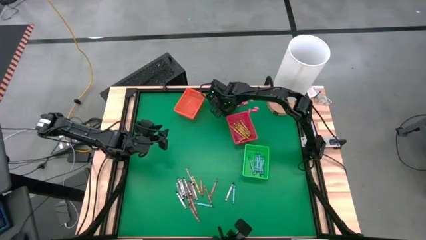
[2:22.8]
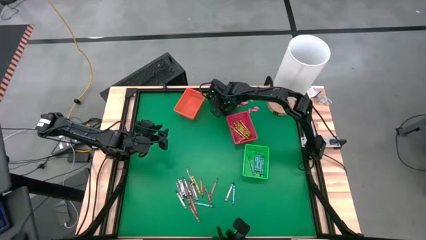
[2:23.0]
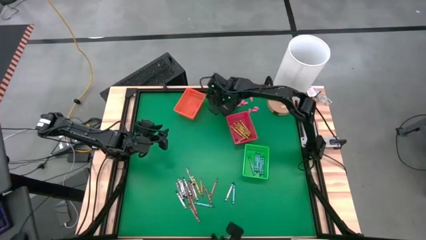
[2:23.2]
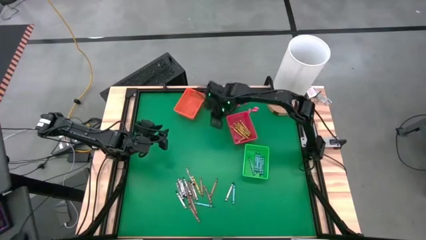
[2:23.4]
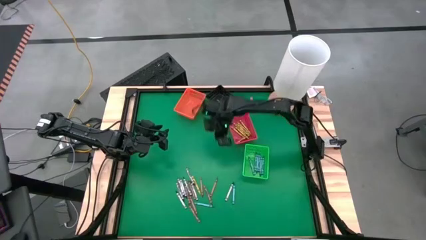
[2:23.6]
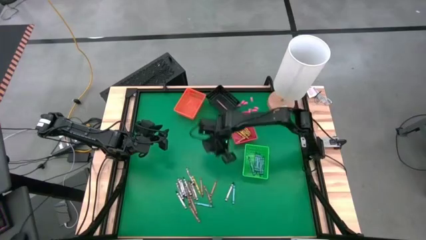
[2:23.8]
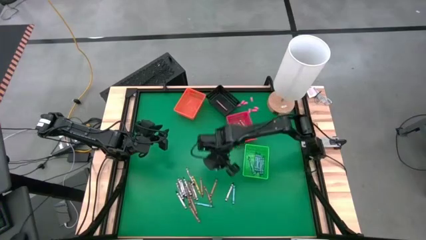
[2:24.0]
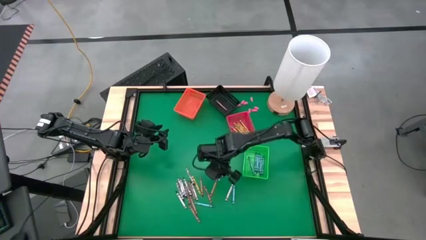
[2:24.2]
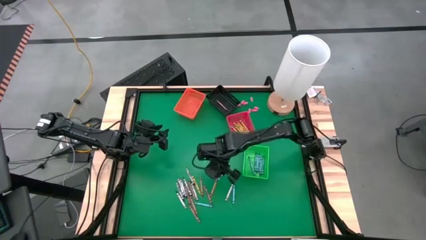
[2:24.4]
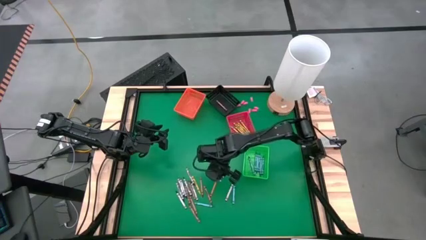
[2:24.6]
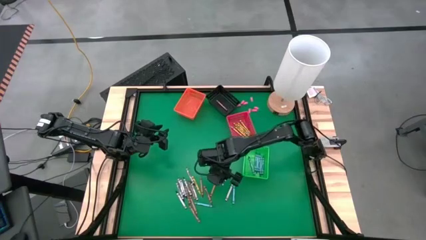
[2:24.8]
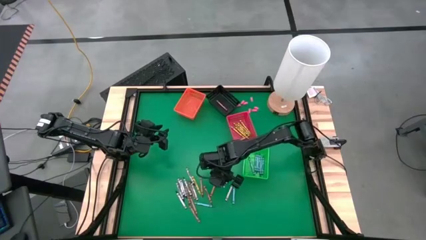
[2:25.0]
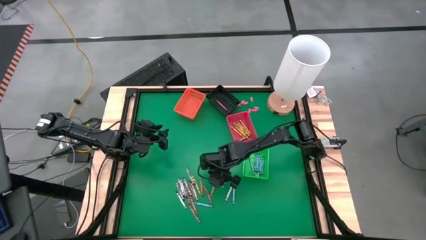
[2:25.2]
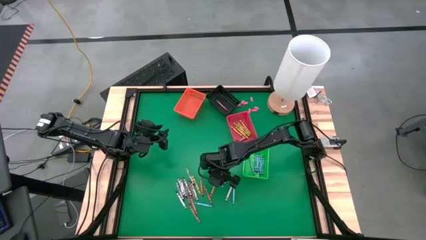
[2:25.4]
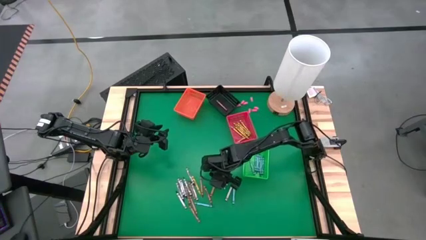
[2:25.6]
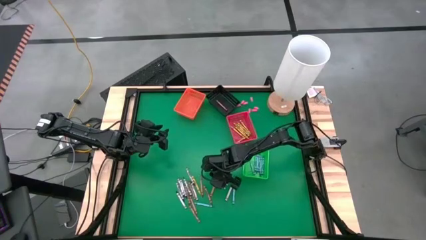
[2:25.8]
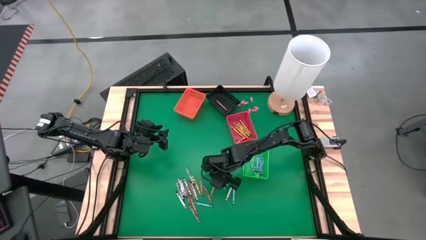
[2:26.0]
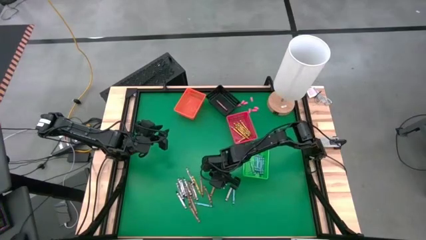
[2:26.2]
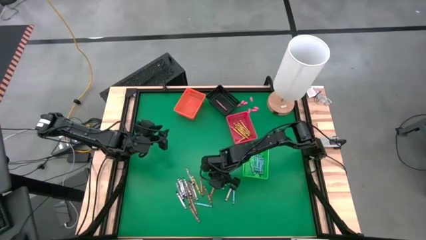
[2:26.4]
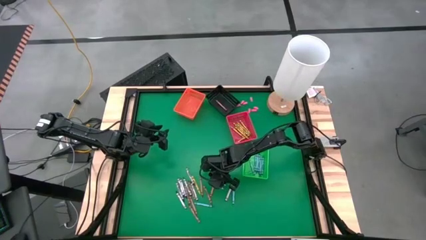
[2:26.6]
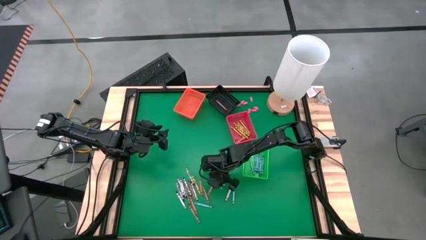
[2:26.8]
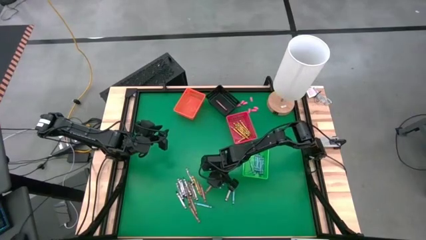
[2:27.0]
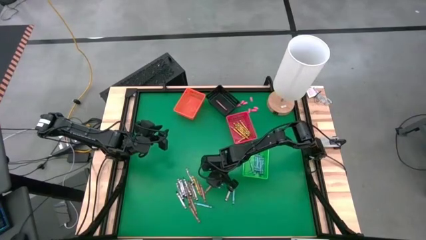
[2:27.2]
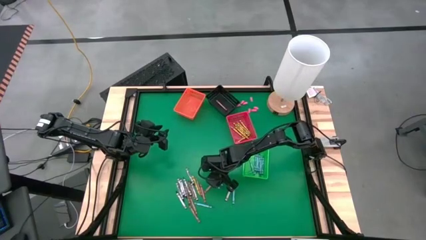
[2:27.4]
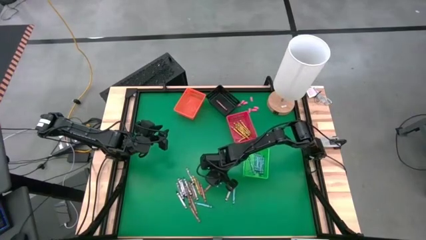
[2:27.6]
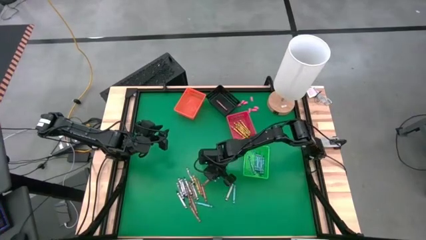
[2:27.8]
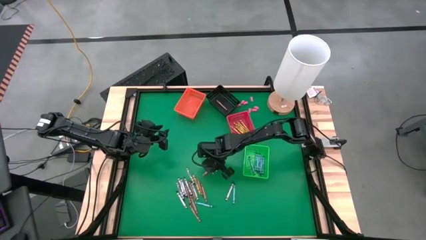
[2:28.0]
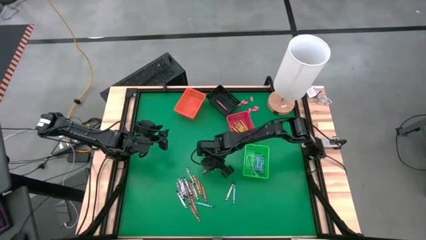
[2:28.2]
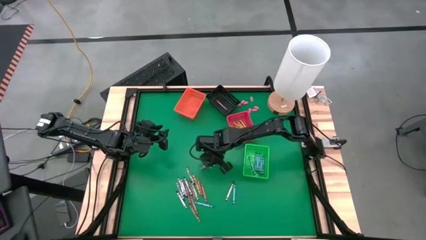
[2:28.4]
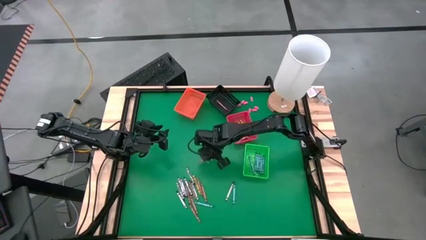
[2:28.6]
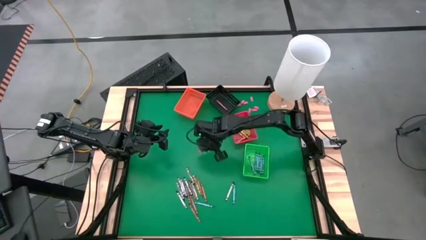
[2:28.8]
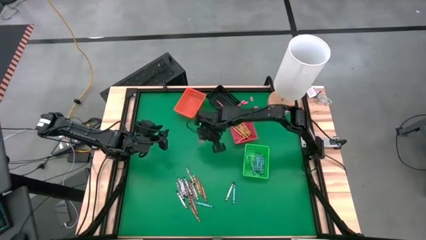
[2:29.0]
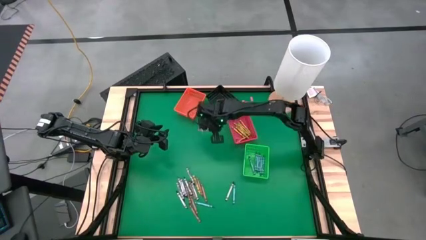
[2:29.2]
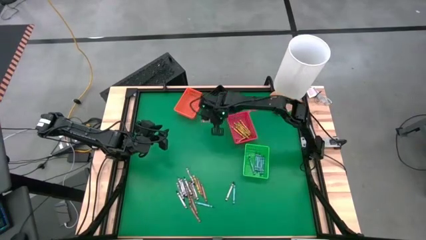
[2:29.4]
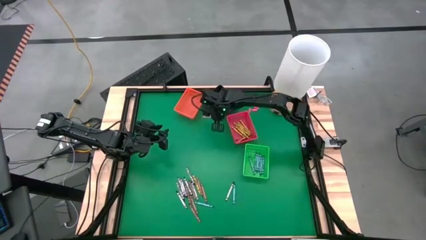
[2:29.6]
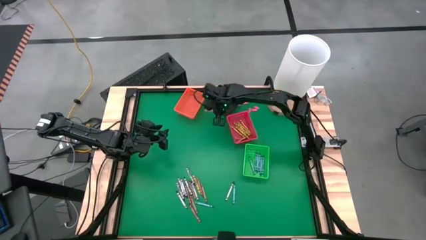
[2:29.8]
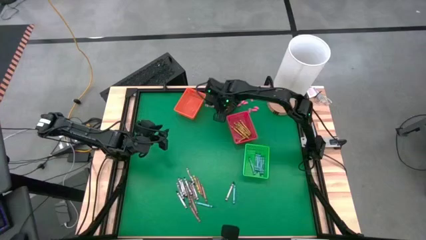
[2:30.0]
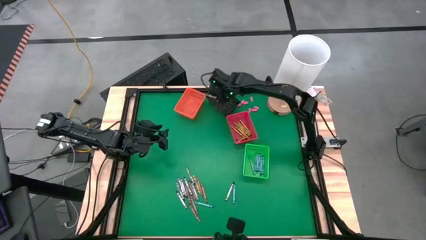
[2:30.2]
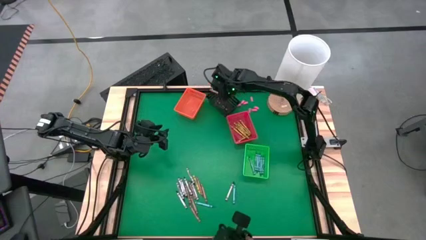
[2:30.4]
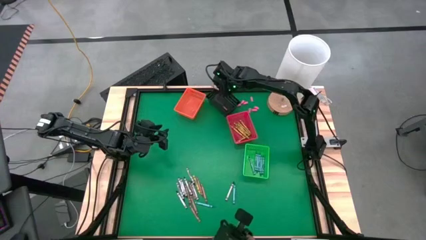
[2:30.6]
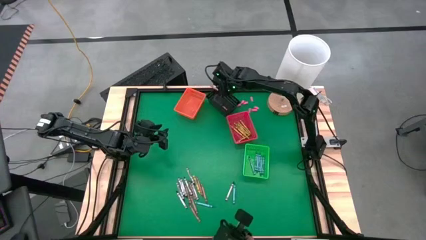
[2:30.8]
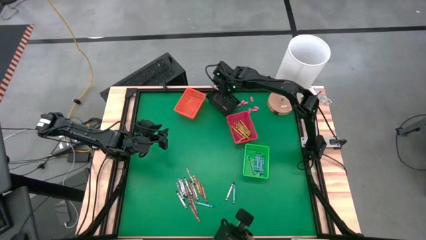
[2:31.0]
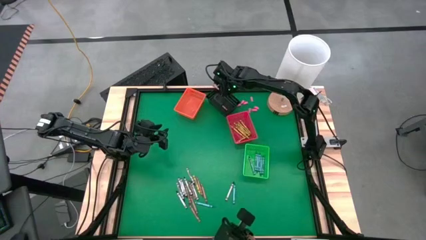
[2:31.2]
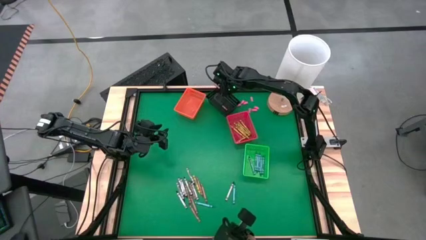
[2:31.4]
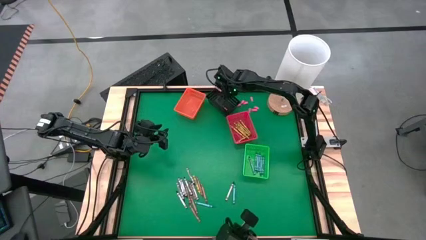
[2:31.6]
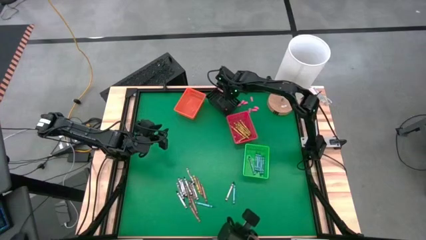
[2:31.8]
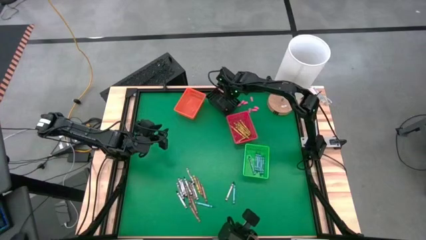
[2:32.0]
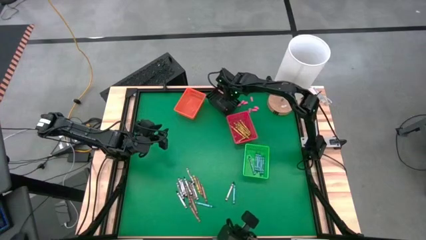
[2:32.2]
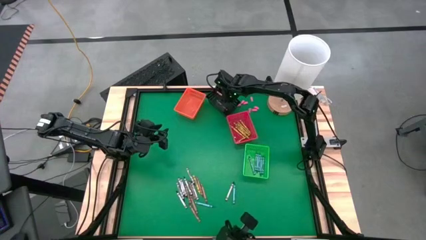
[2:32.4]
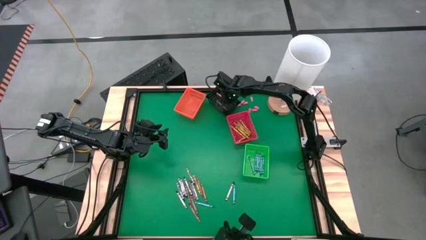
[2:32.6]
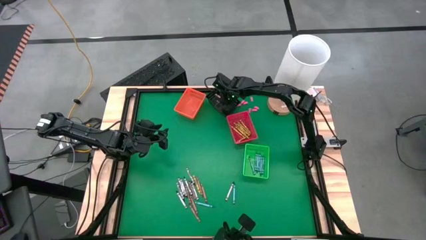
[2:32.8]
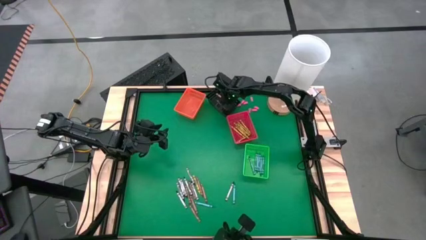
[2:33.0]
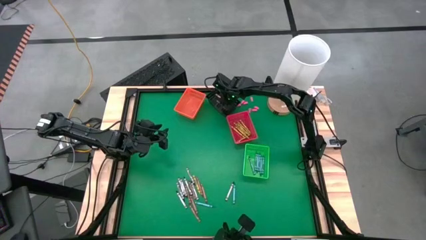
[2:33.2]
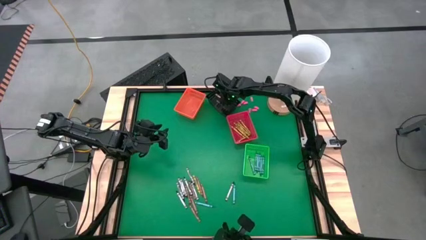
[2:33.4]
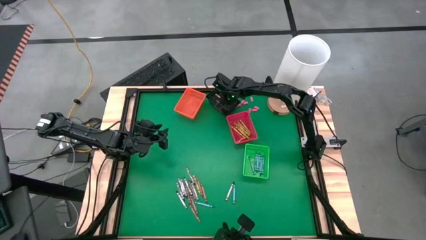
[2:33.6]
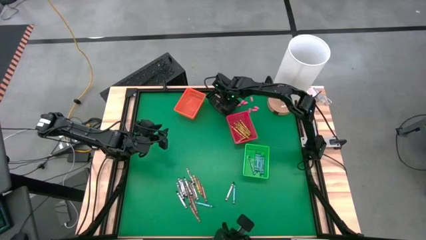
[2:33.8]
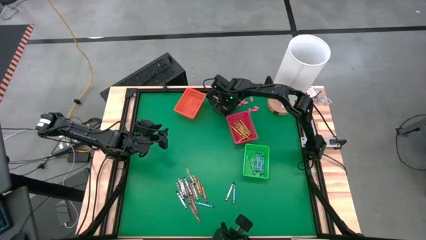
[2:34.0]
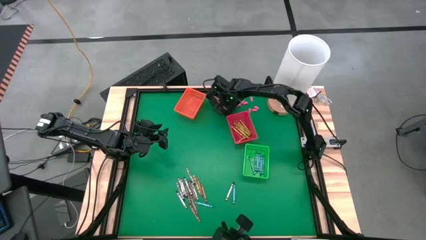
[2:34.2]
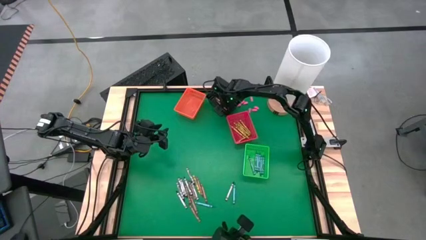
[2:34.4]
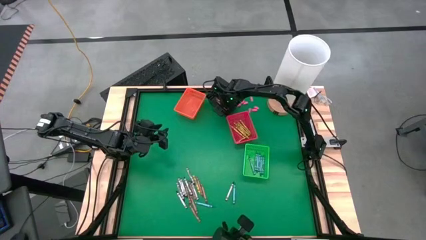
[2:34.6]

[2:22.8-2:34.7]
Task: Sort crayons
Put the brown crayon into the black bin
